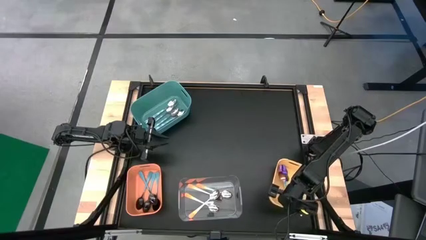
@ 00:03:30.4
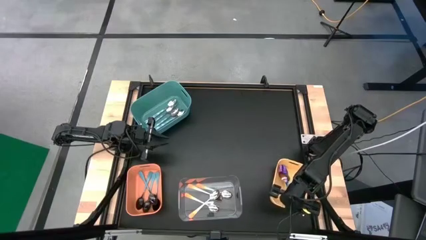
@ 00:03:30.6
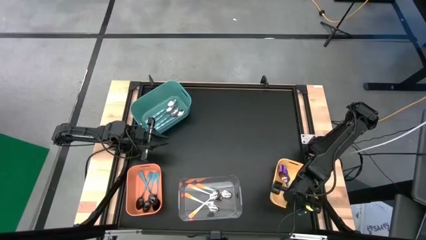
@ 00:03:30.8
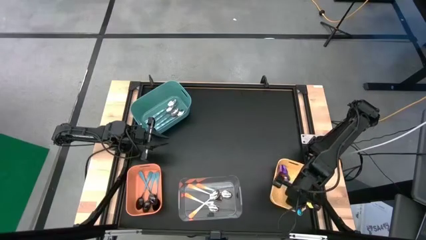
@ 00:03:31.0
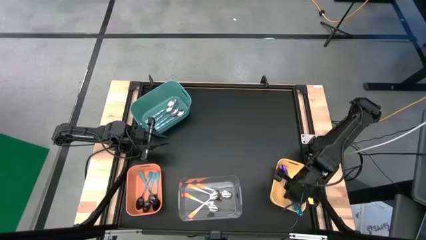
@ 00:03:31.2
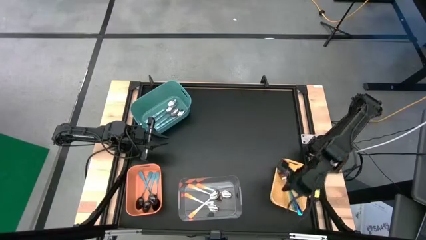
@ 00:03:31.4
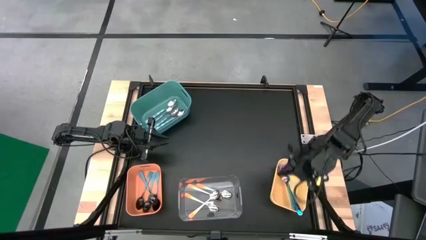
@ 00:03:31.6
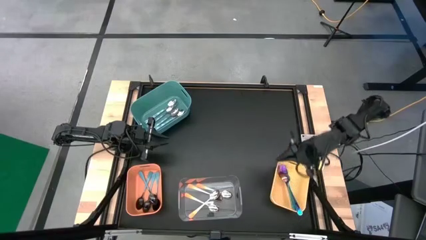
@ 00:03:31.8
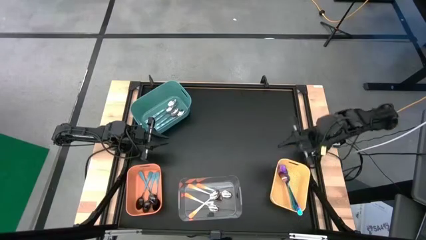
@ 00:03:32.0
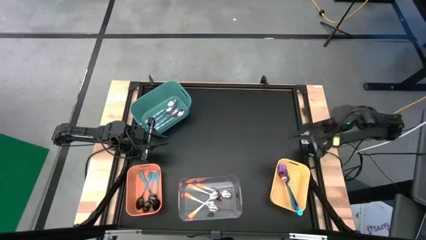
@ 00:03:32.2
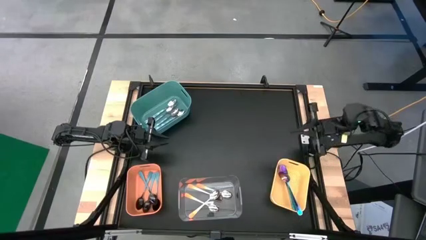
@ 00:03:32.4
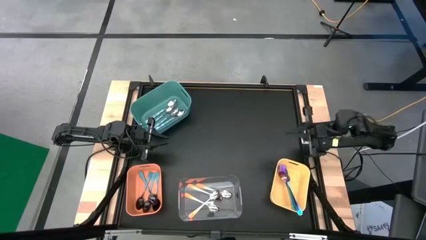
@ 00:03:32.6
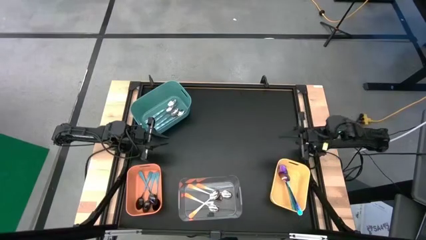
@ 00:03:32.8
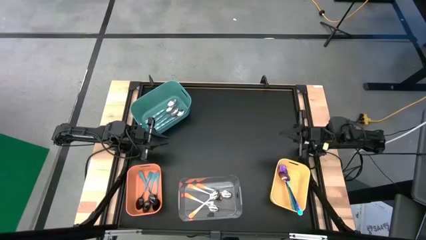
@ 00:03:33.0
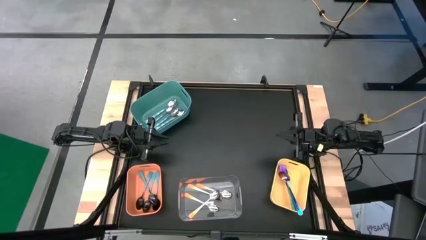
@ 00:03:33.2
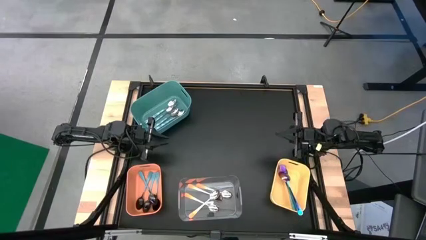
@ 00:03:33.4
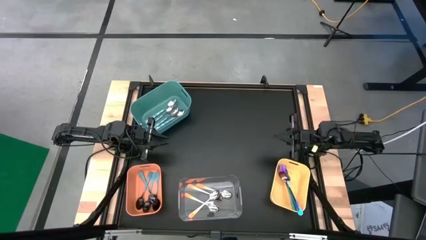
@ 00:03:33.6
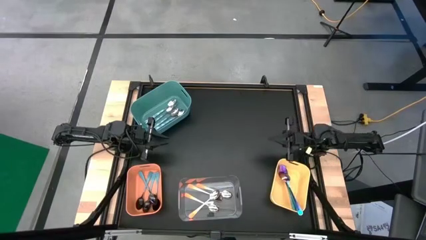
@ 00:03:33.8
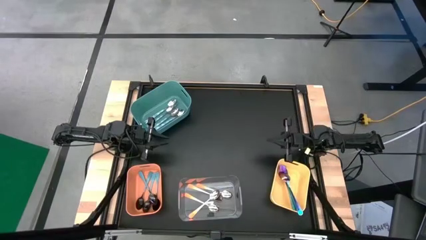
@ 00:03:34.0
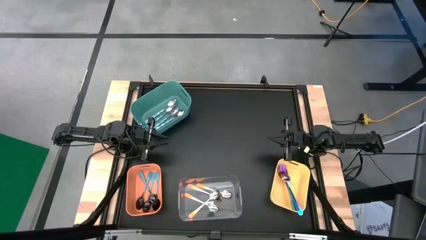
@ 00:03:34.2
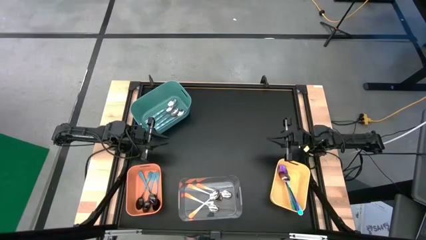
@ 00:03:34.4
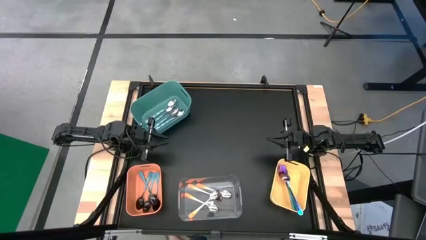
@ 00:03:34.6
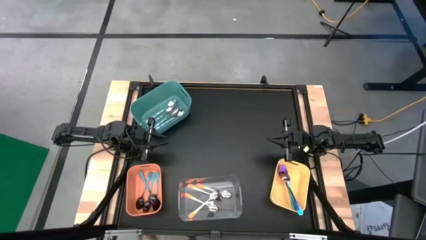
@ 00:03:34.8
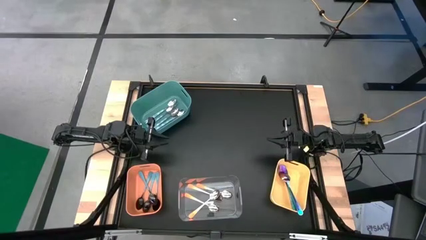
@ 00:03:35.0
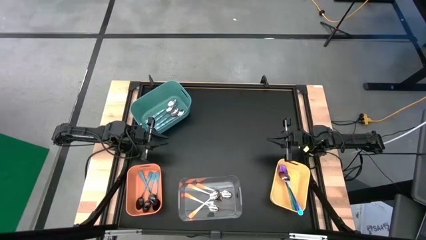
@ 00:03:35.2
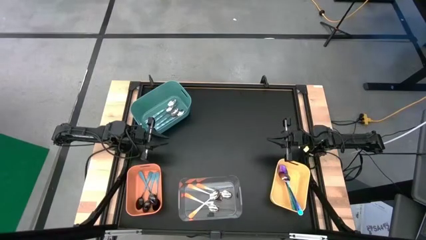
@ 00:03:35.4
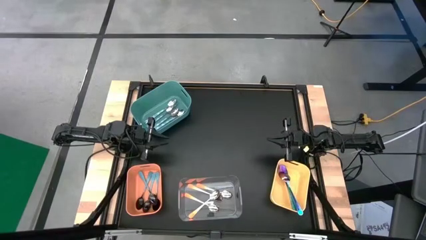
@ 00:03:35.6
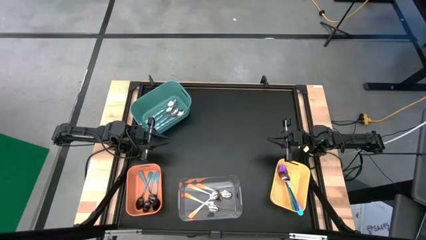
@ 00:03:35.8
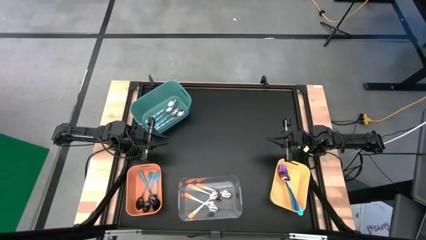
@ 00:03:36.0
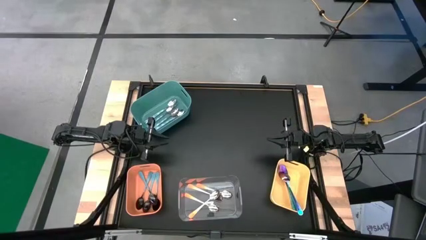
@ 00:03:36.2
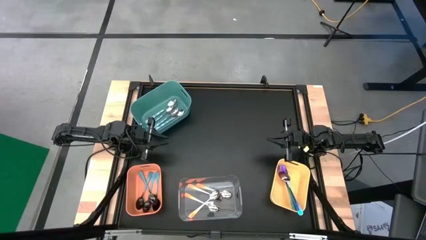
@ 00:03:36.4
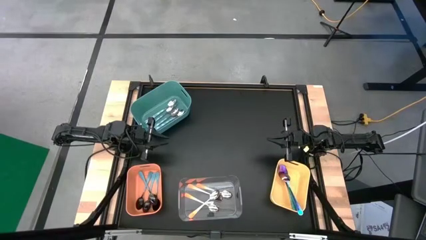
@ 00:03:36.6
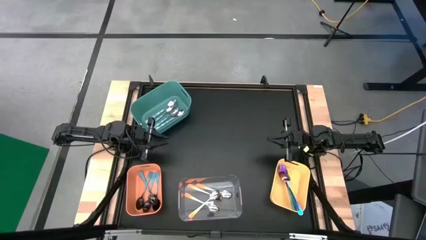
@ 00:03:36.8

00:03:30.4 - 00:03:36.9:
Task: Sort silverware by color (type)
Return to Home Position

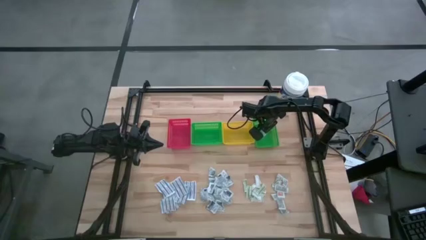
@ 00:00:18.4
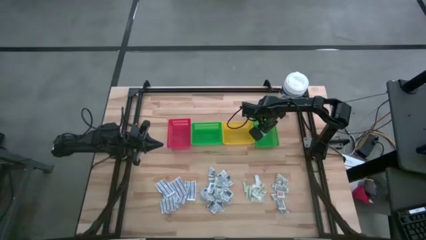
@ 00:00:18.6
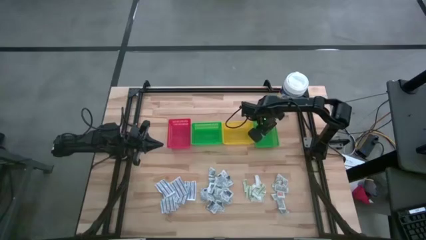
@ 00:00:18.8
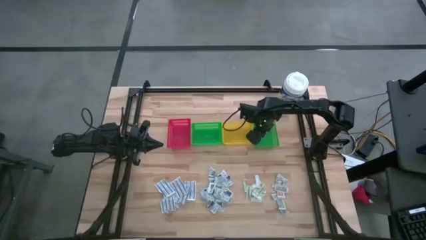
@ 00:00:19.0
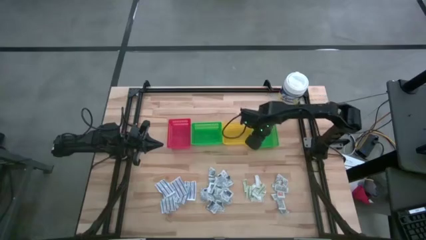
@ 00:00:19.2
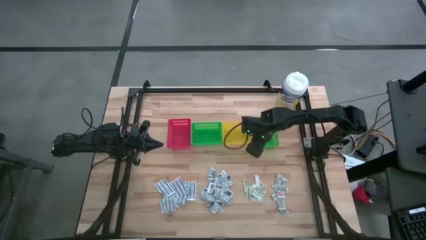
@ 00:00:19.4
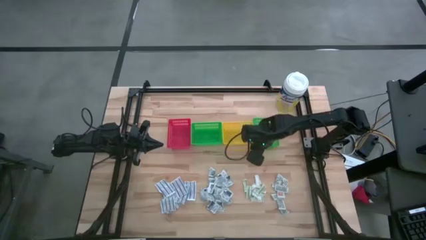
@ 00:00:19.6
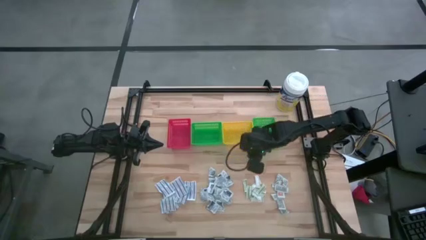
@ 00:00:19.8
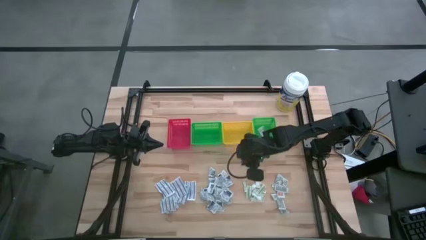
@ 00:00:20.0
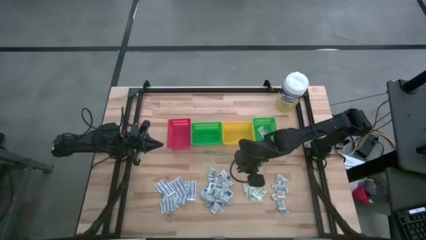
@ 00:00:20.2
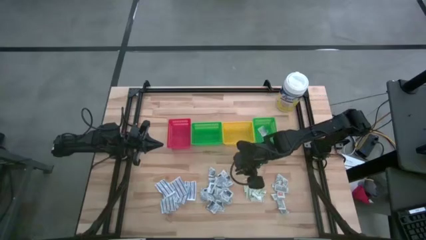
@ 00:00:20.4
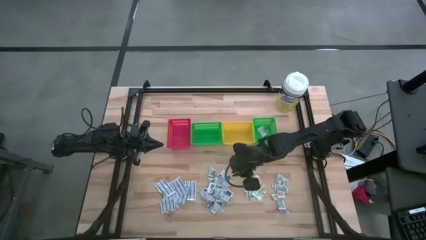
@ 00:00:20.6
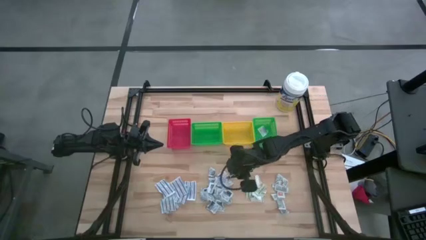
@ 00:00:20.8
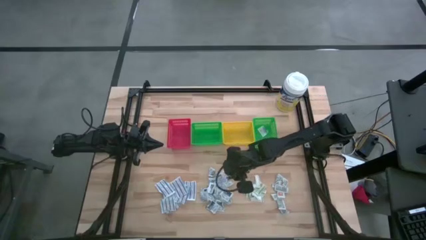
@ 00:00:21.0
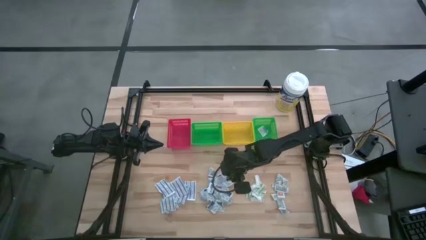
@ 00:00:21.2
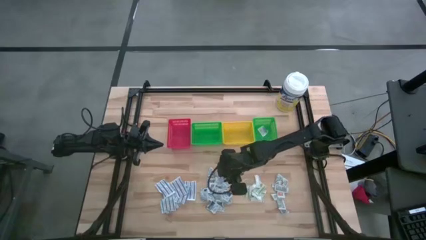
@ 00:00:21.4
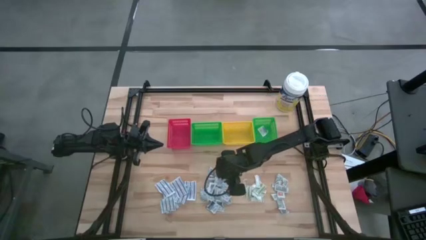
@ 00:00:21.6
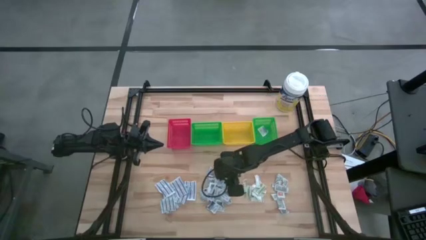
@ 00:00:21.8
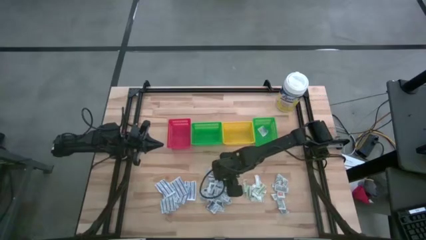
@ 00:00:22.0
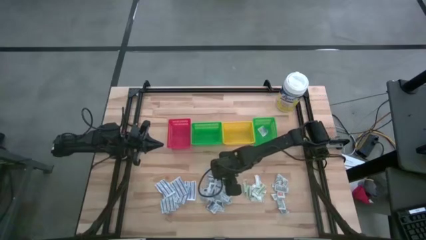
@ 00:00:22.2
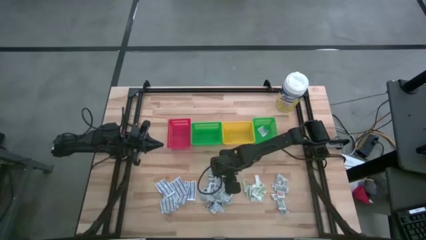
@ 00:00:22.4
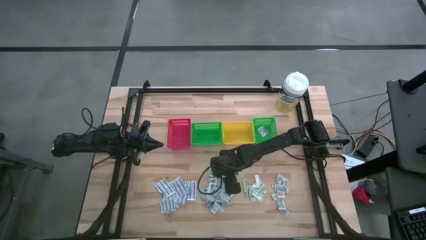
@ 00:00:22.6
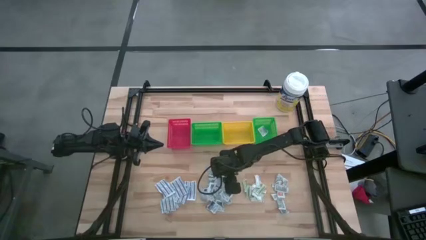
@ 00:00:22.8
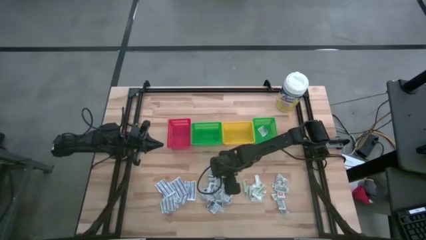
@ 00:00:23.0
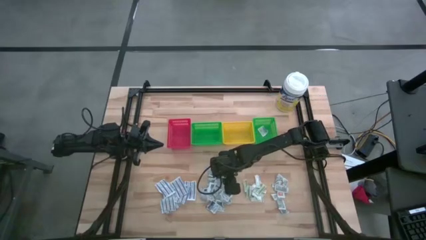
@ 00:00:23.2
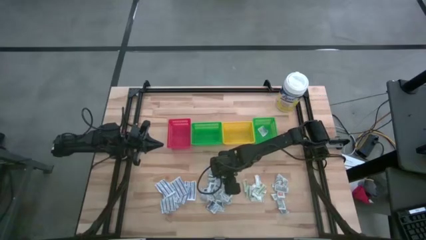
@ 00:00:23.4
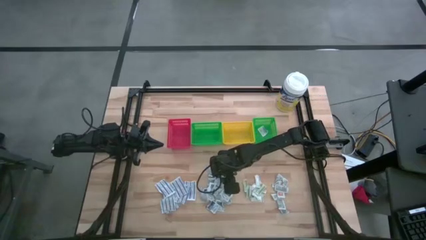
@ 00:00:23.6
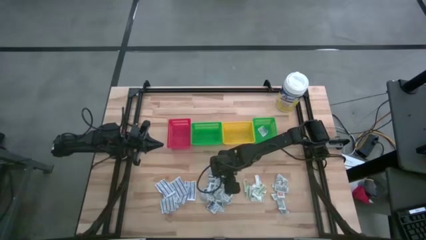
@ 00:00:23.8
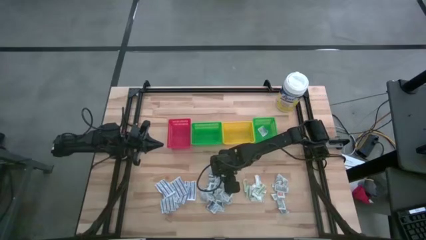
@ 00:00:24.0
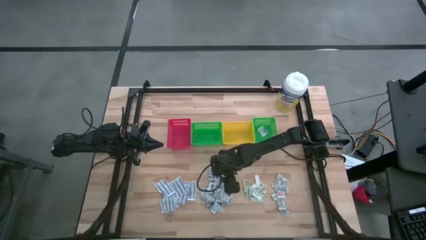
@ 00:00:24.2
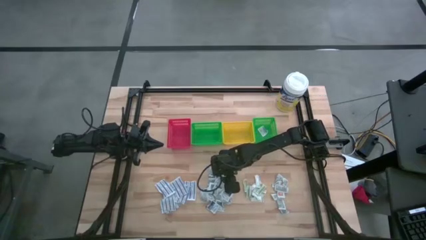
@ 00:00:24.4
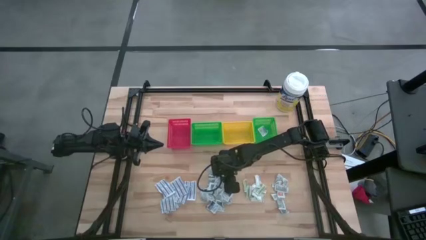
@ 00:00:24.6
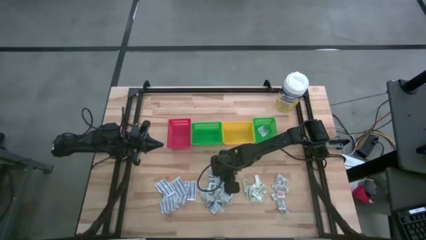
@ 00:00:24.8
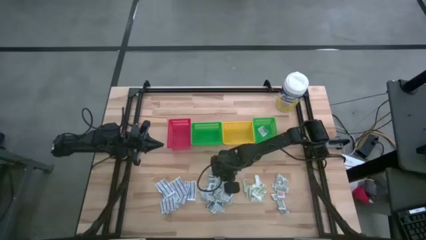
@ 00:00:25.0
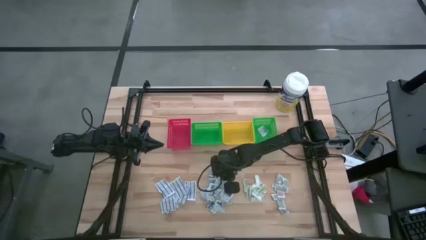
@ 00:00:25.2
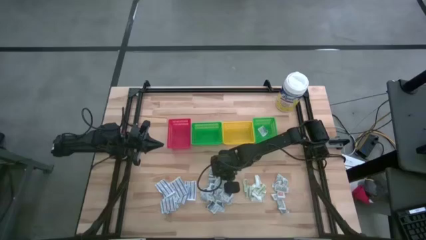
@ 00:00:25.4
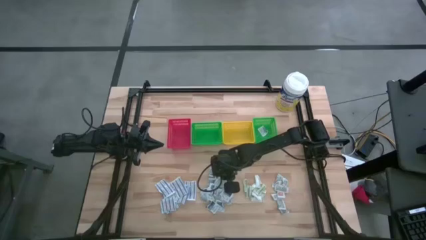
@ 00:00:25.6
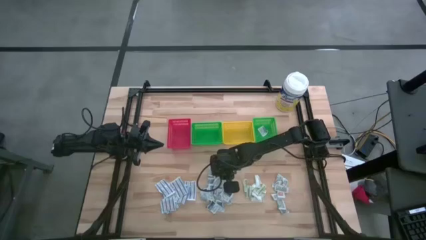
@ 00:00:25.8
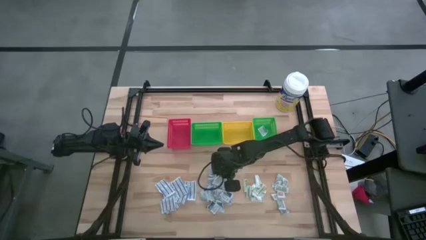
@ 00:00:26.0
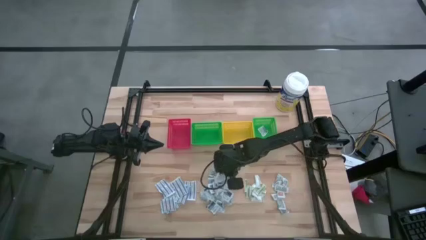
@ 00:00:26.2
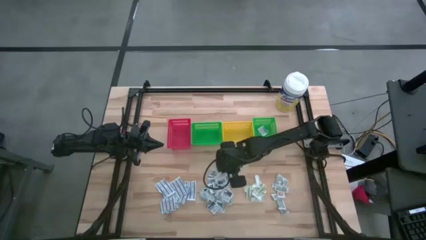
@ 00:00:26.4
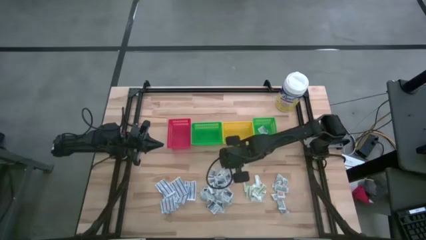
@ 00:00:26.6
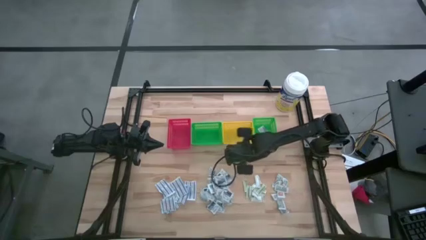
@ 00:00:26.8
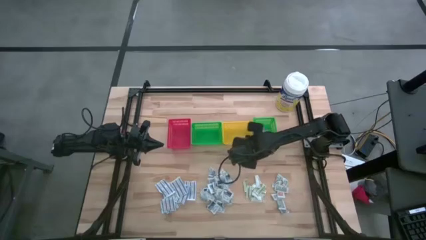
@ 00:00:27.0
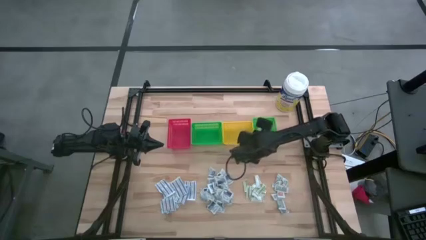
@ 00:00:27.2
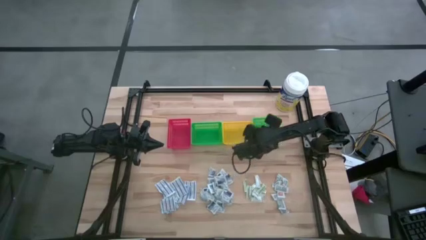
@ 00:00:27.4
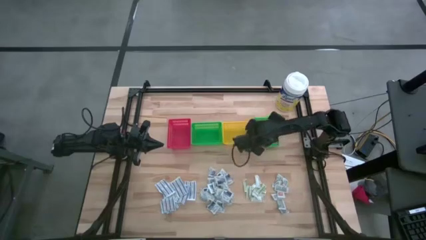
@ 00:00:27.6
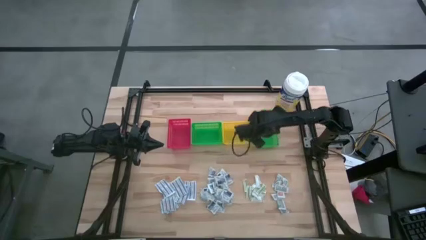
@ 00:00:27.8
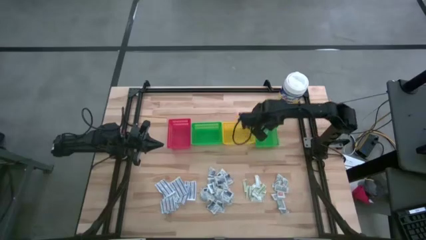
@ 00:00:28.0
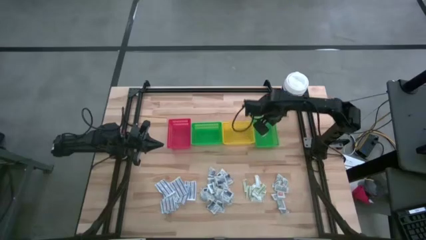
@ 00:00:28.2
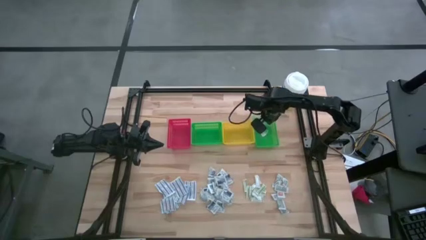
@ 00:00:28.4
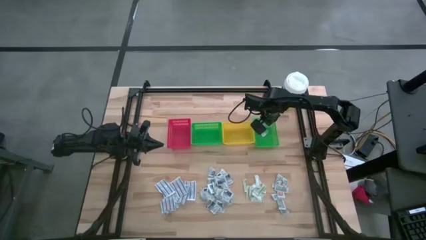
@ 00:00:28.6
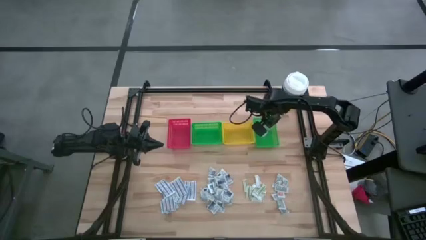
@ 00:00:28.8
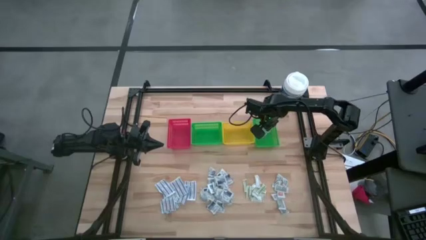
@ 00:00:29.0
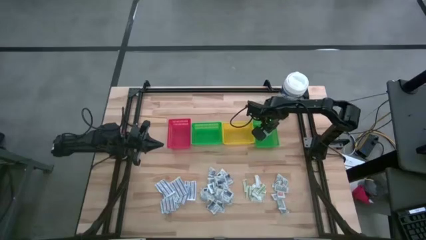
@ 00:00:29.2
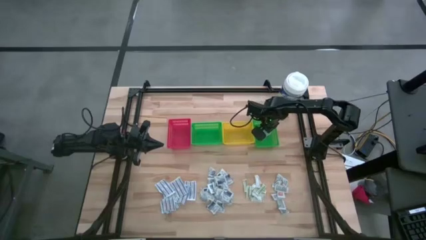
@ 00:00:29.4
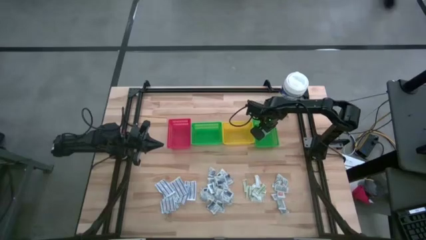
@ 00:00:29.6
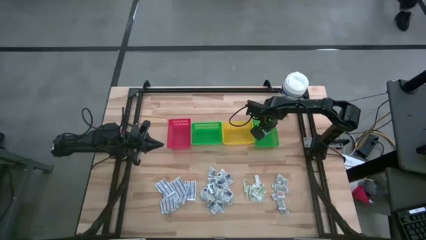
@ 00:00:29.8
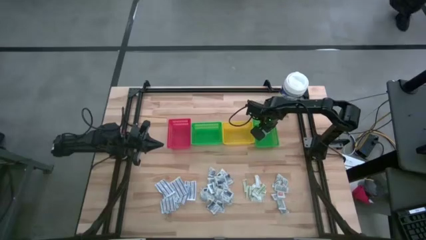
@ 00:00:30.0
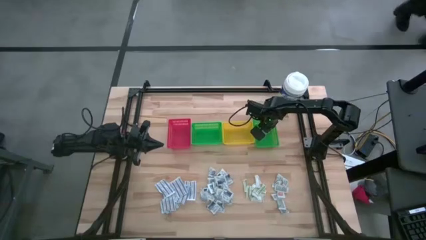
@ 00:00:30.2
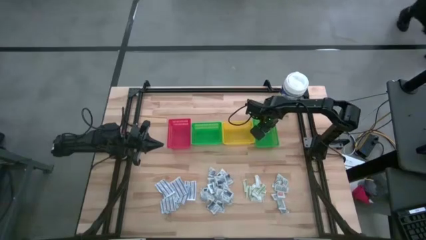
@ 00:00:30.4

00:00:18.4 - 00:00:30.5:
Task: Pick & Place First Aid Supplies
Put the blue alcohol pad into the right green bin
